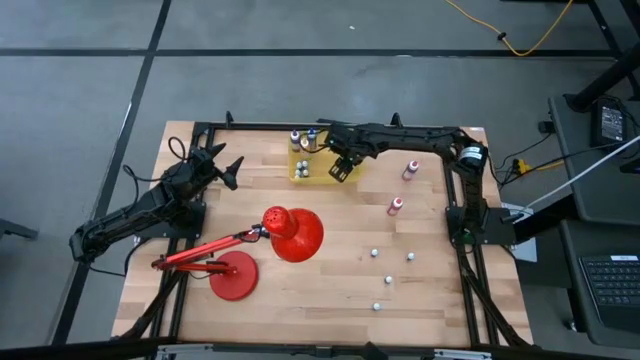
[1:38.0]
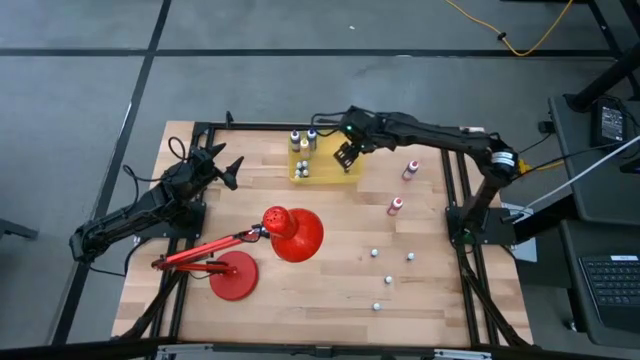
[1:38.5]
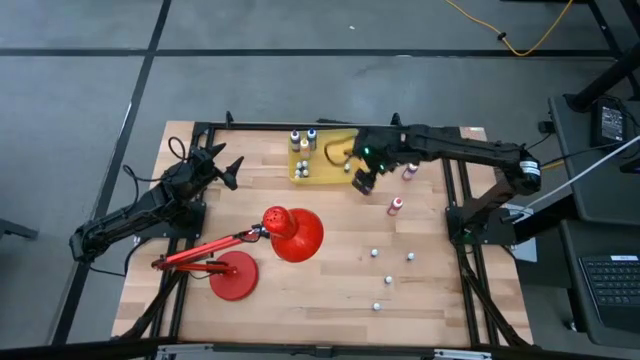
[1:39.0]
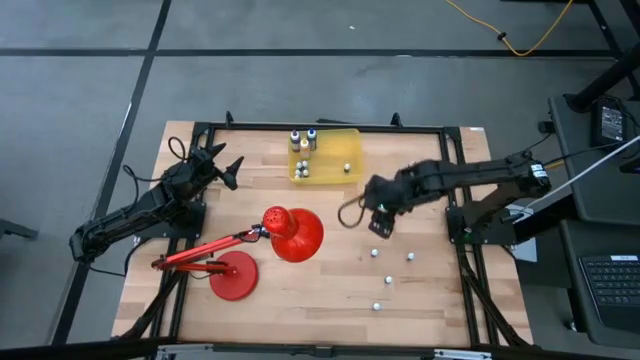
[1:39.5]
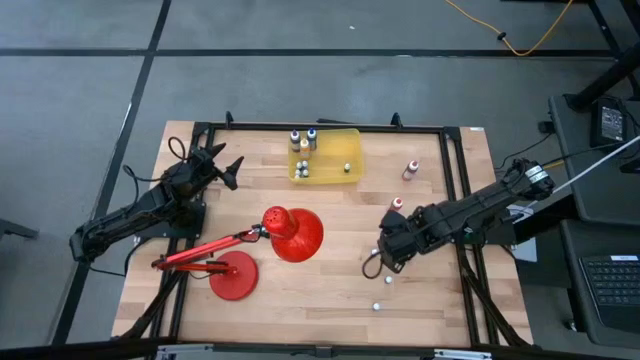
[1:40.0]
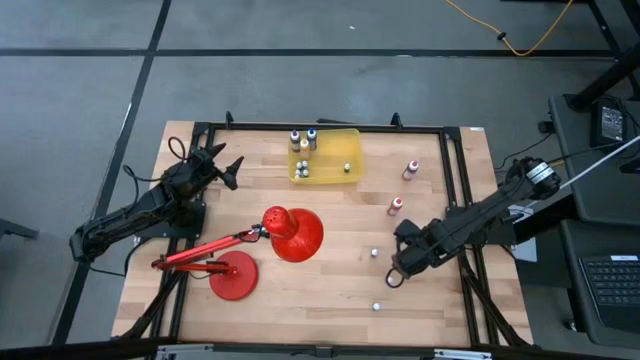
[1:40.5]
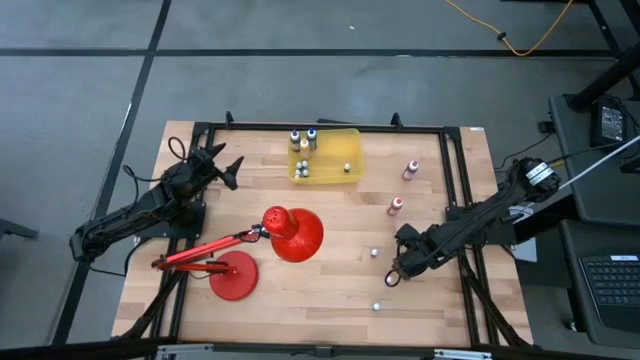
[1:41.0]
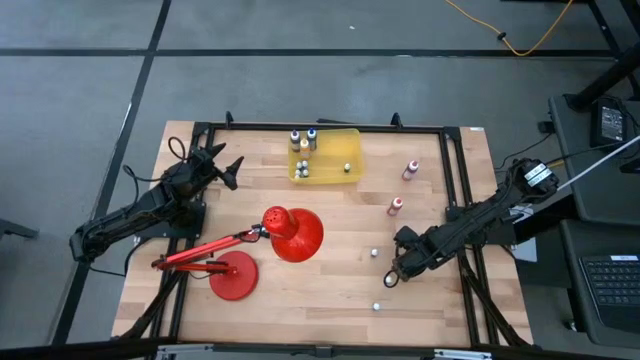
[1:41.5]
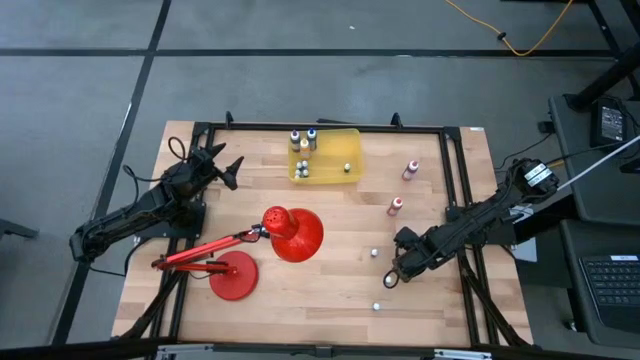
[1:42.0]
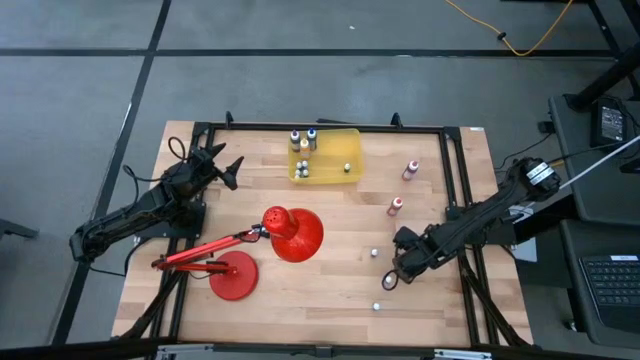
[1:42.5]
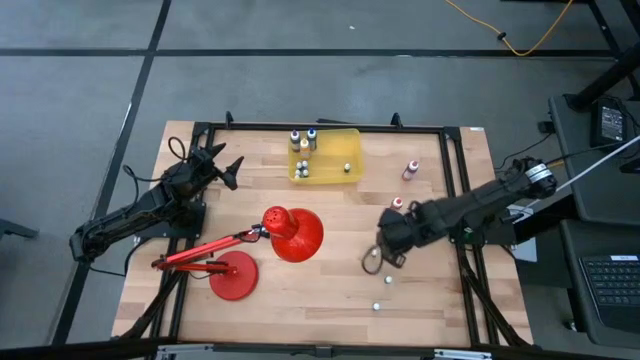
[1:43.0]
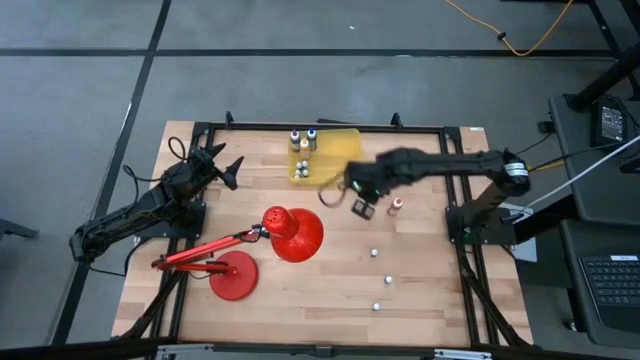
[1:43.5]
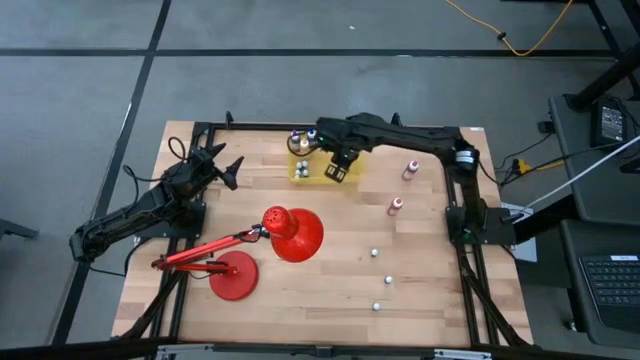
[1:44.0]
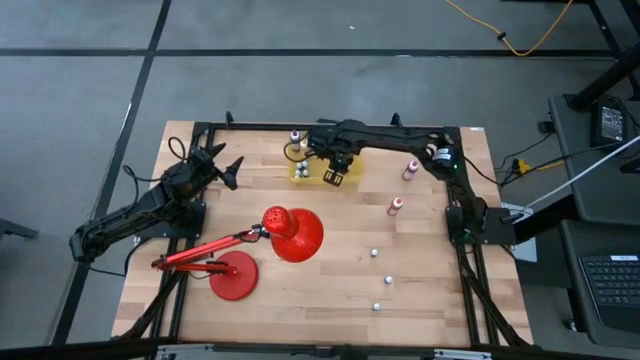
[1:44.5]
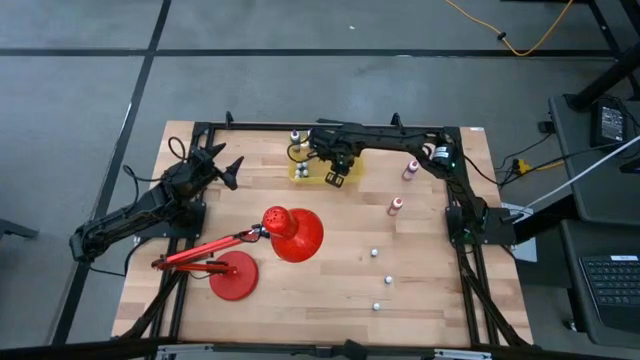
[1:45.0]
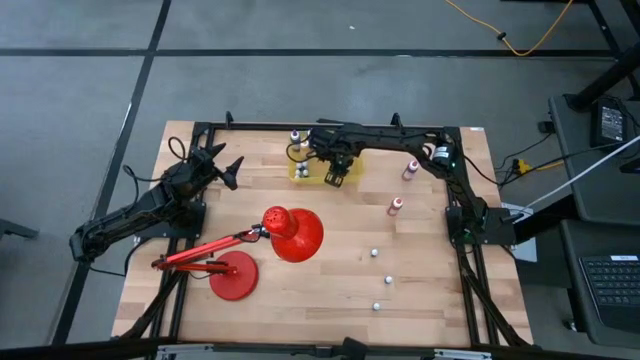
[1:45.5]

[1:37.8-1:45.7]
Task: Pick & Place food coloring
Put the red food coloring bottle into the yellow bin

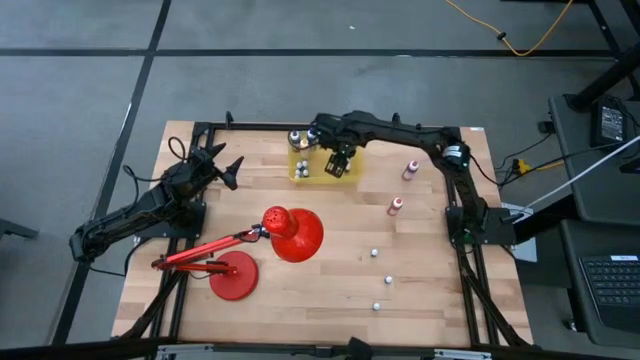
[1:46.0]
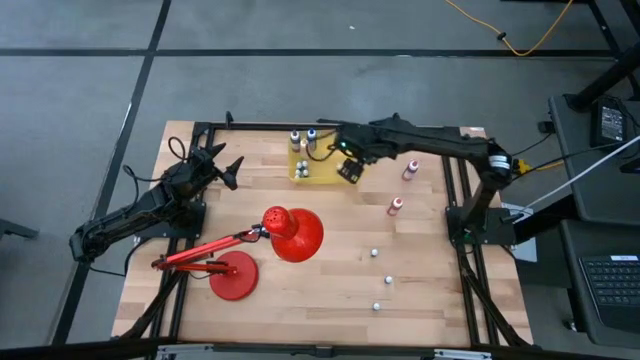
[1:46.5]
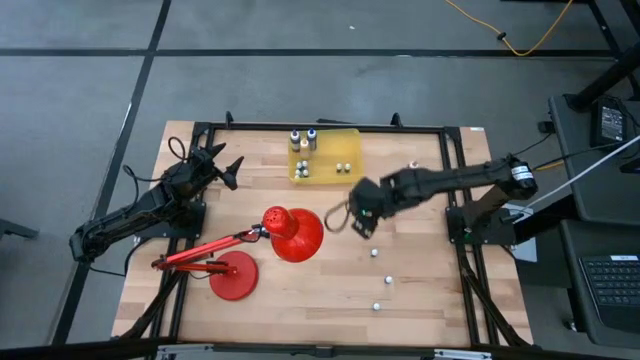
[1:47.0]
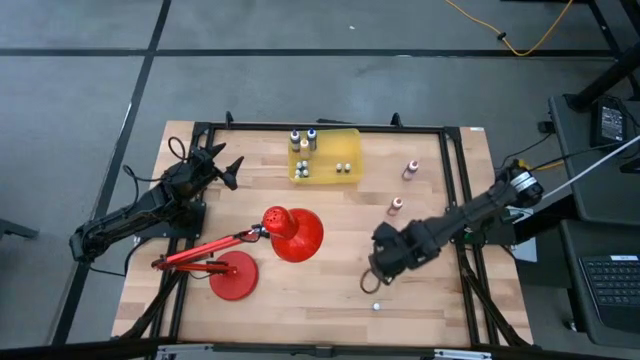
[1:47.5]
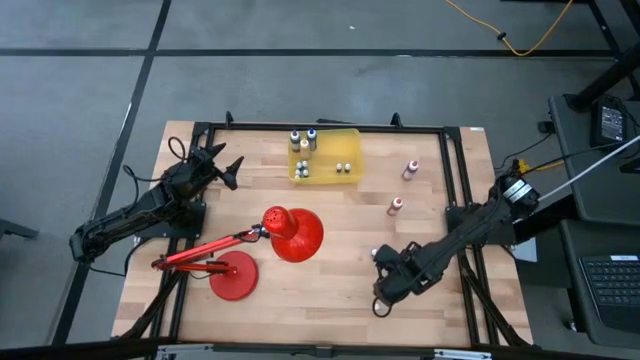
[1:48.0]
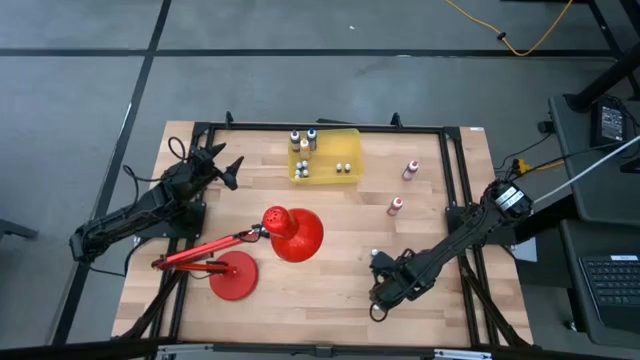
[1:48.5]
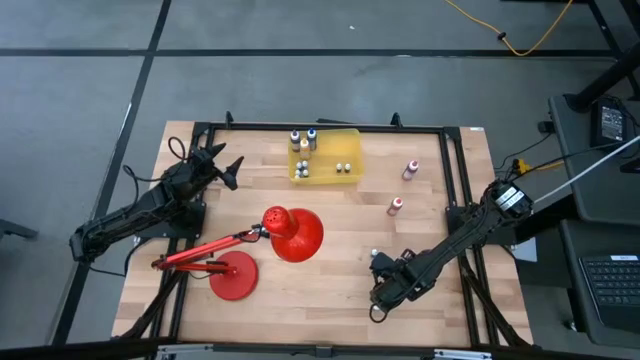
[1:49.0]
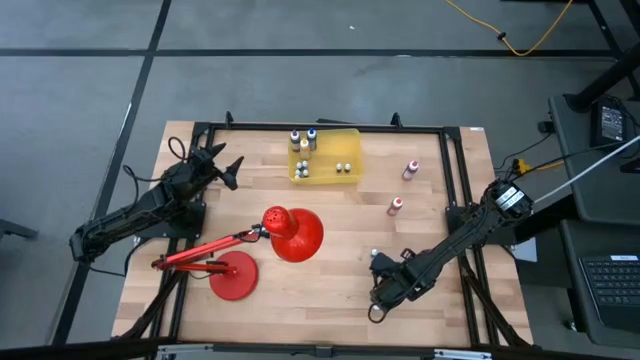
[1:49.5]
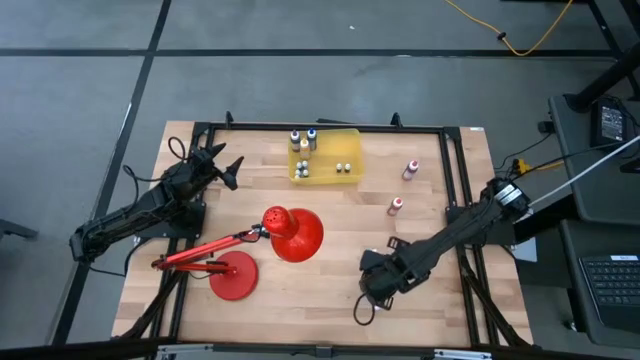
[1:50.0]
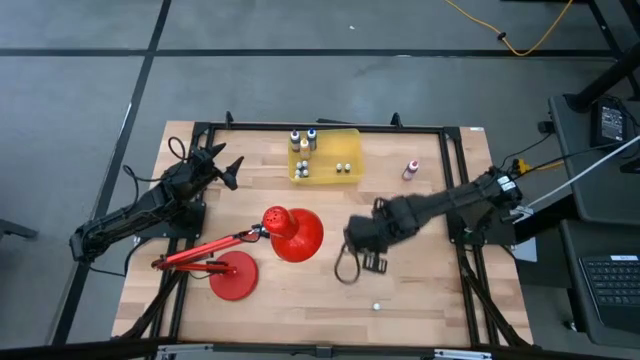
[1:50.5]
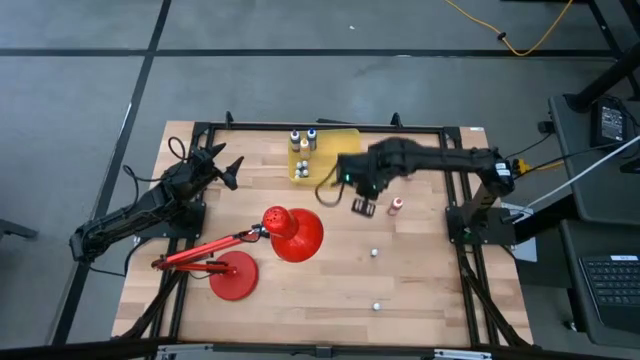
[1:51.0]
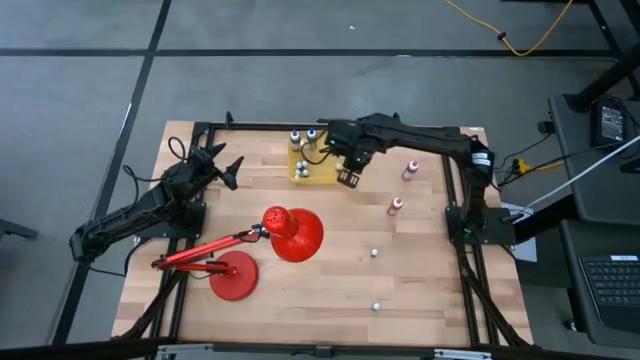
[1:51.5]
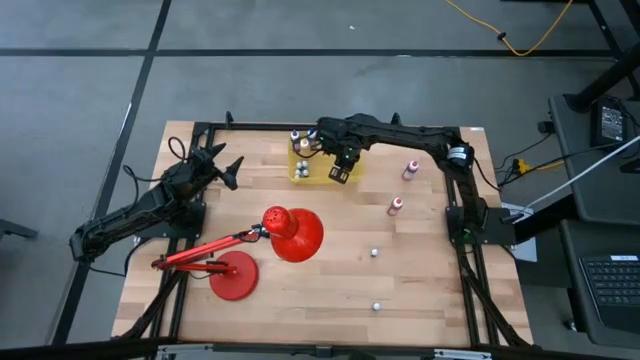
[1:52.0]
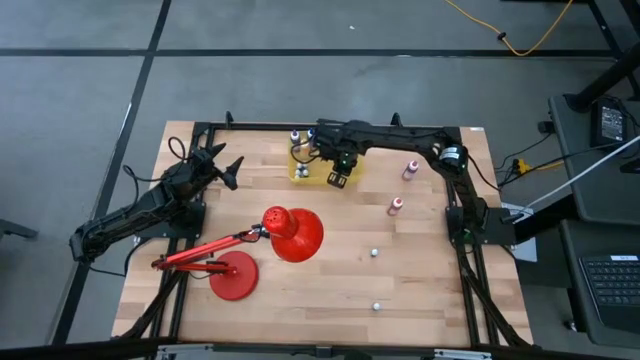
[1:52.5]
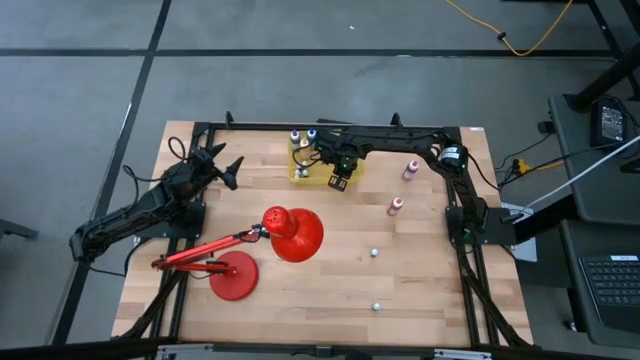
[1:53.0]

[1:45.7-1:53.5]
Put the purple food coloring bottle into the yellow bin

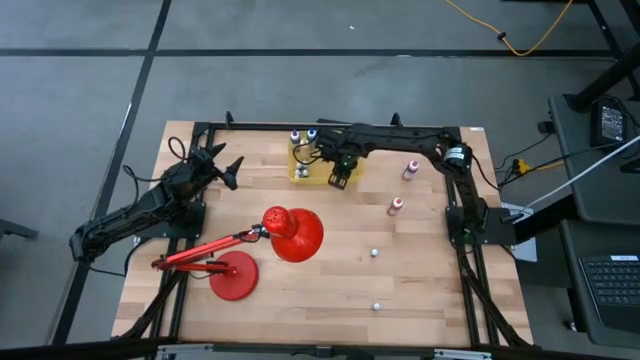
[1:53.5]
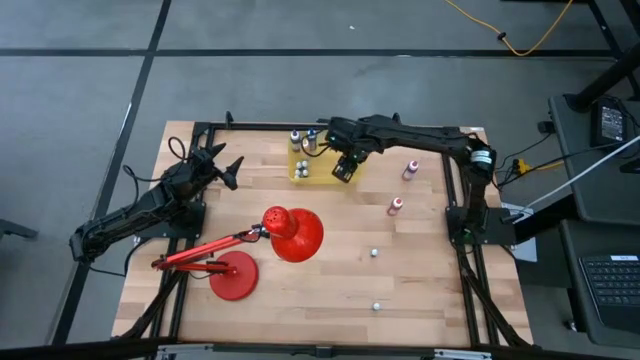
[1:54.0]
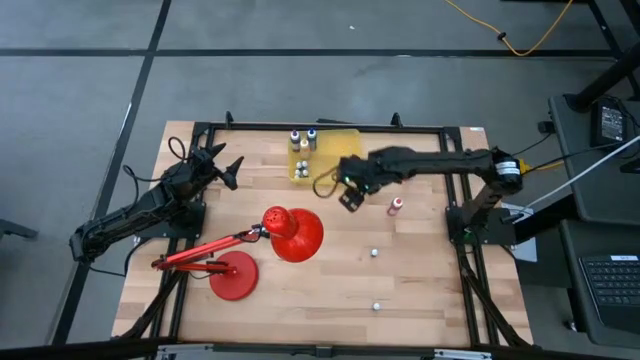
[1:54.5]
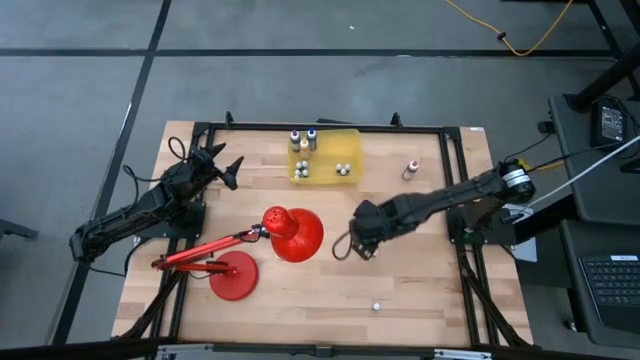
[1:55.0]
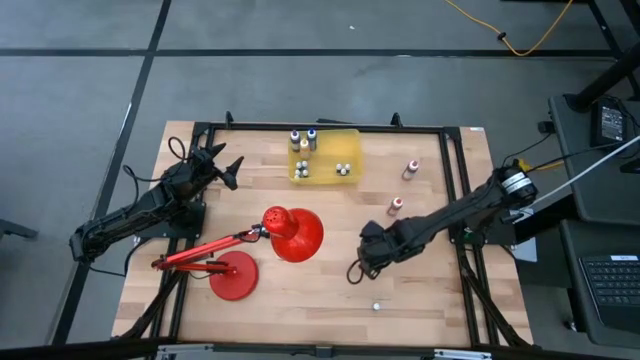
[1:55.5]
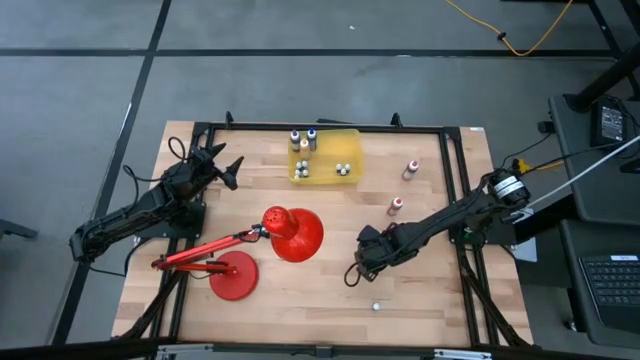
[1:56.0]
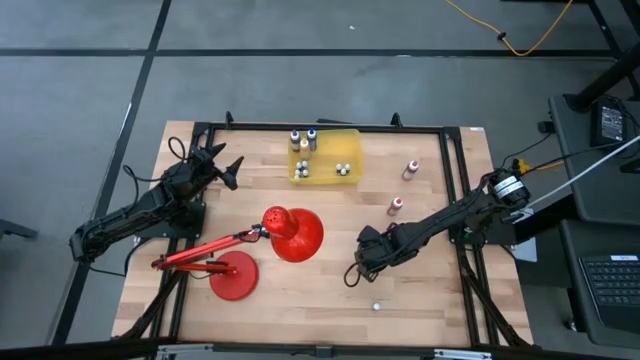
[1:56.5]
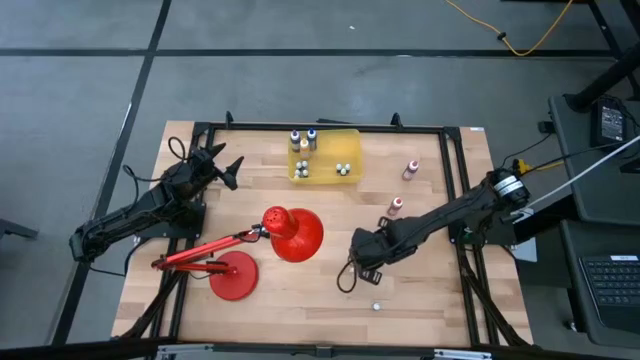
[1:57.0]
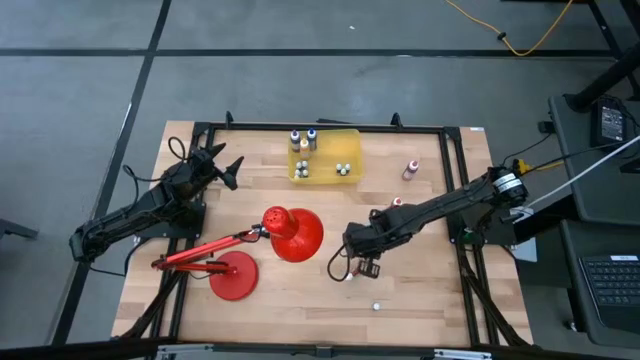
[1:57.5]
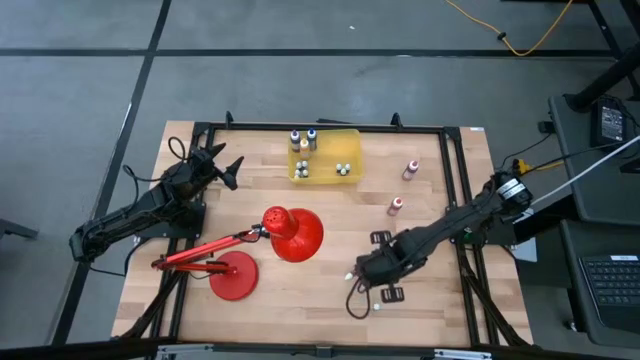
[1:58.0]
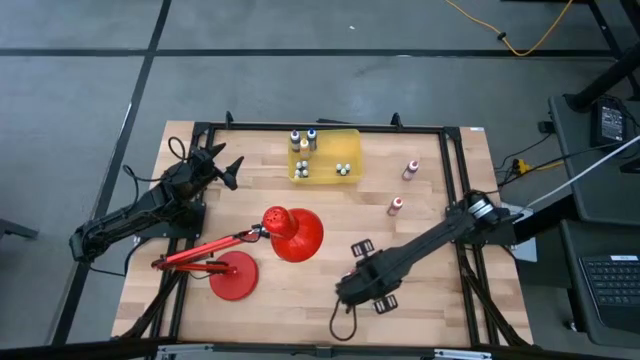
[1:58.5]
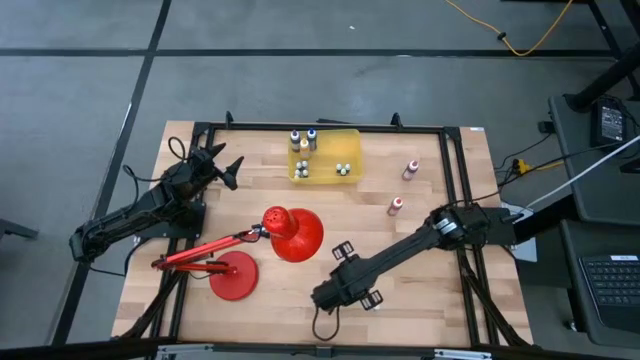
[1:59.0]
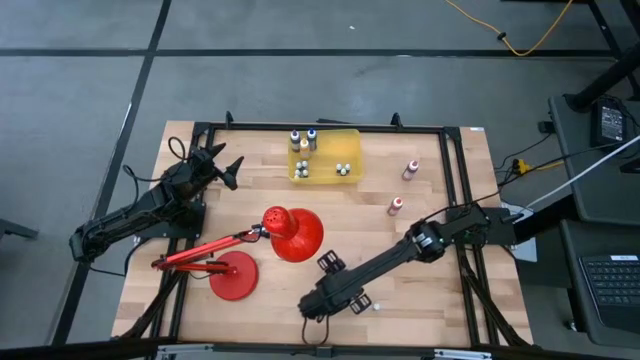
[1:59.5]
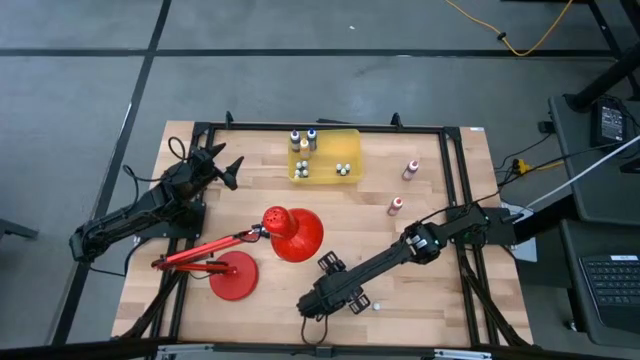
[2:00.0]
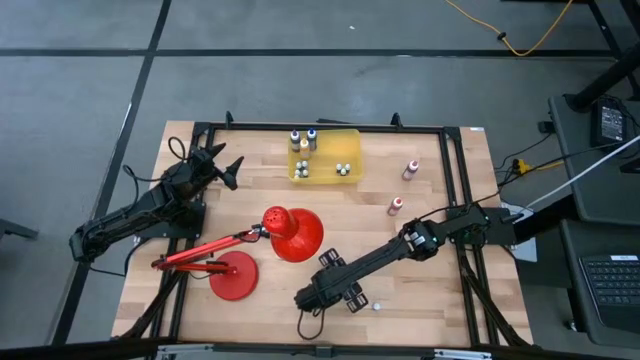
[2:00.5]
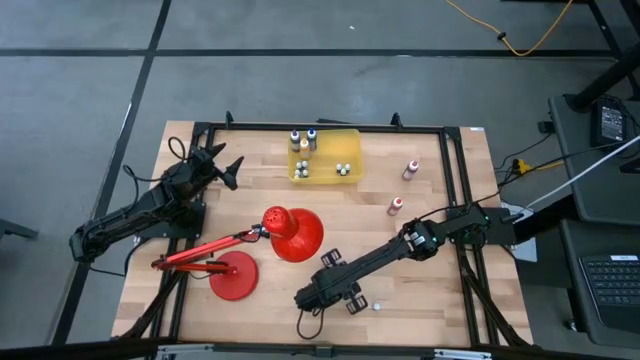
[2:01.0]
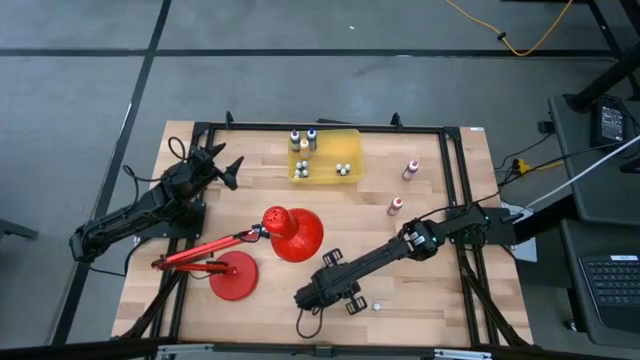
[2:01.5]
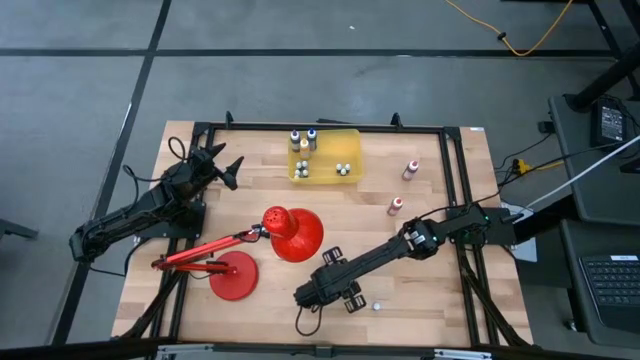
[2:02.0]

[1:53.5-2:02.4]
Put the red food coloring bottle into the yellow bin
